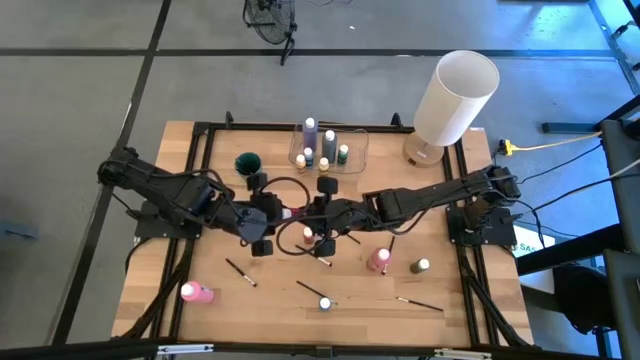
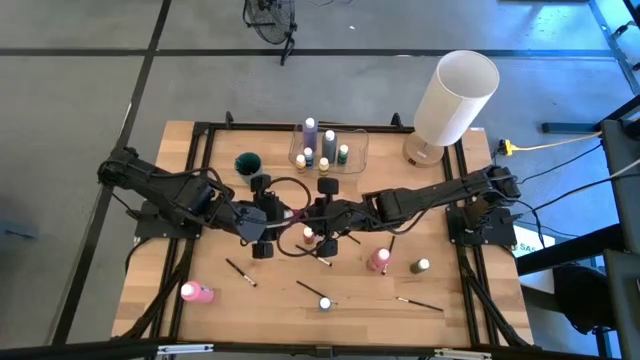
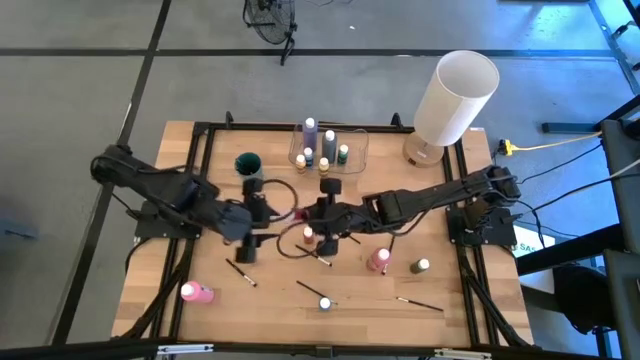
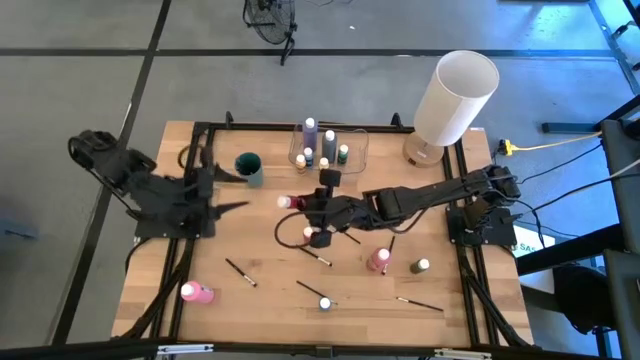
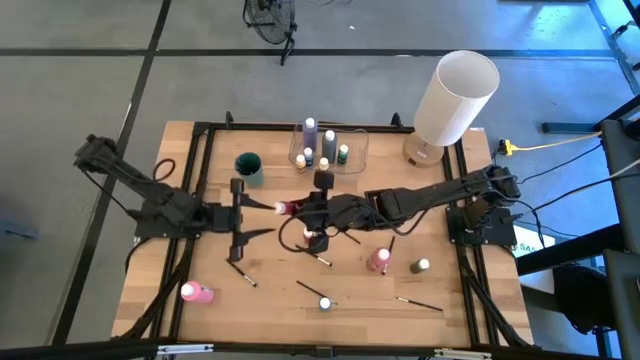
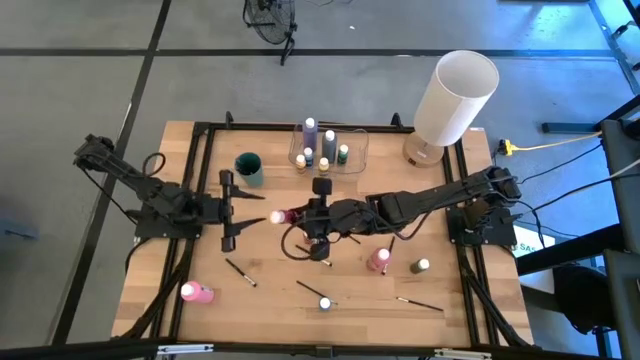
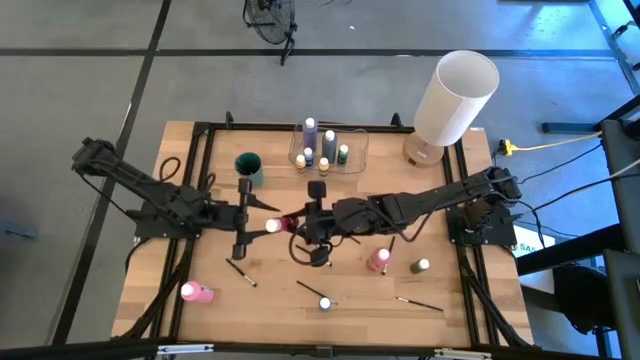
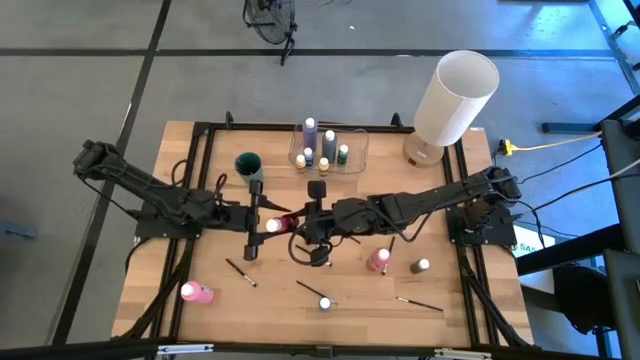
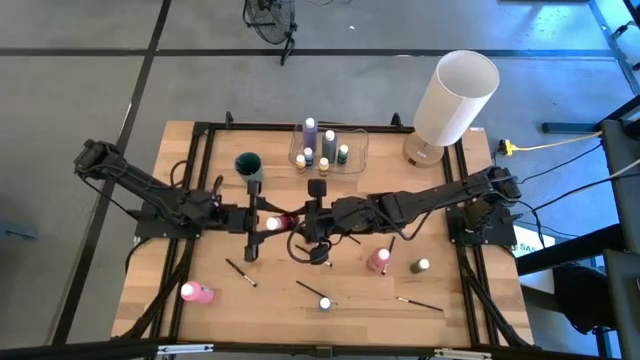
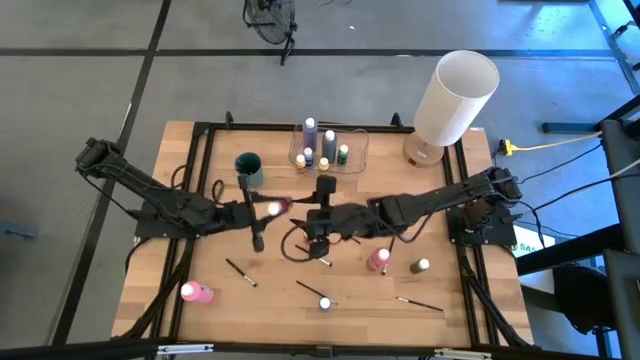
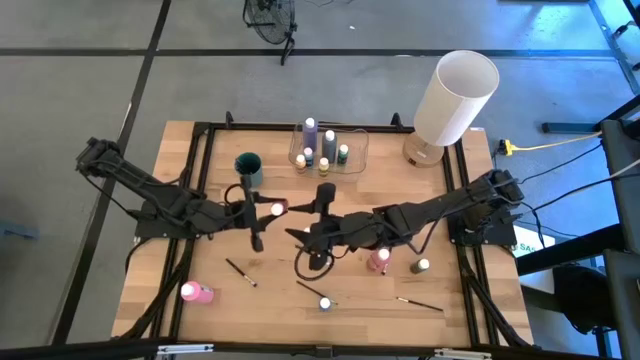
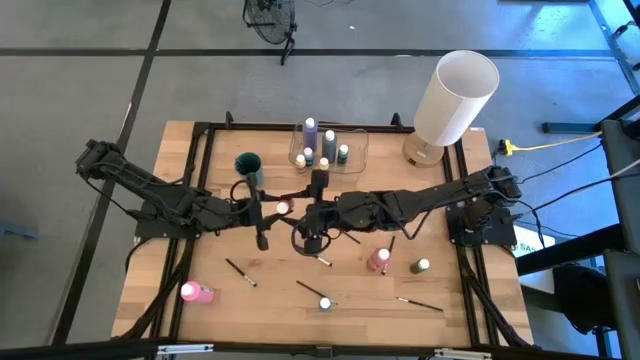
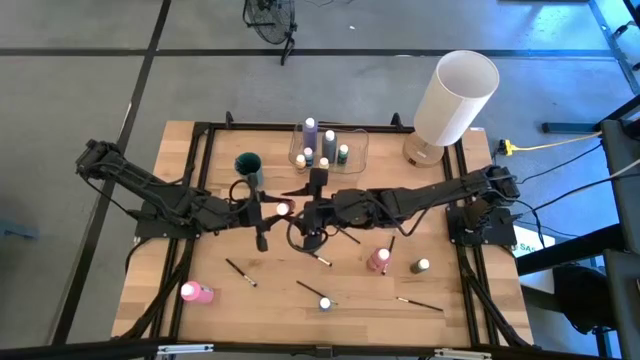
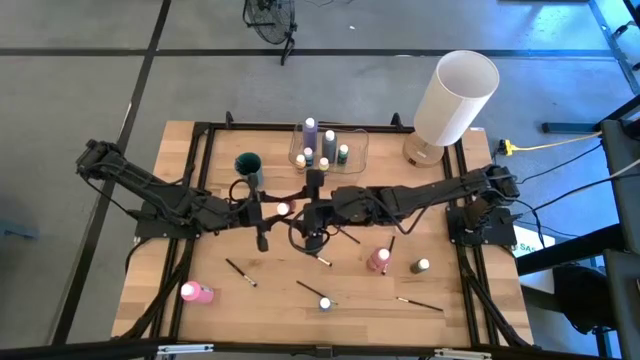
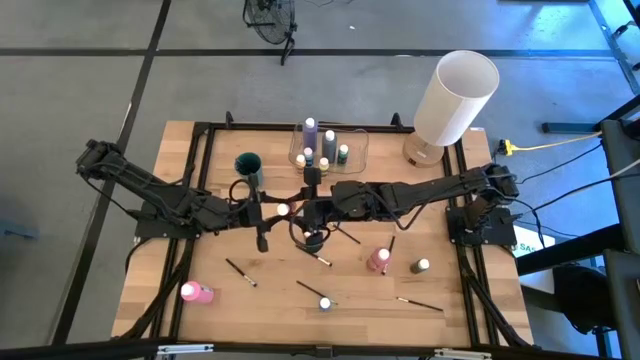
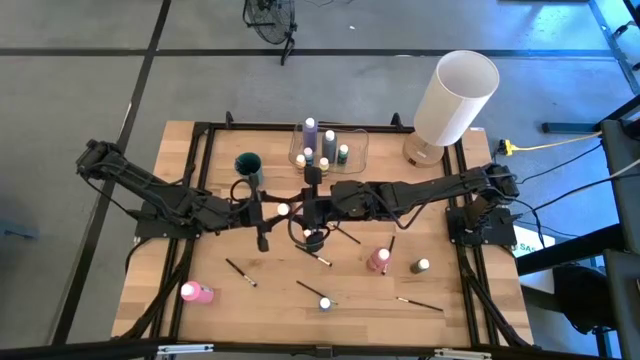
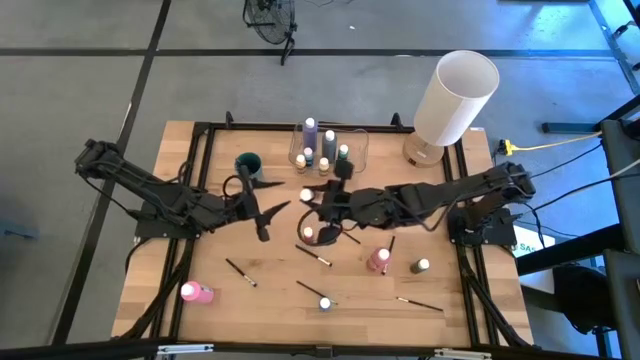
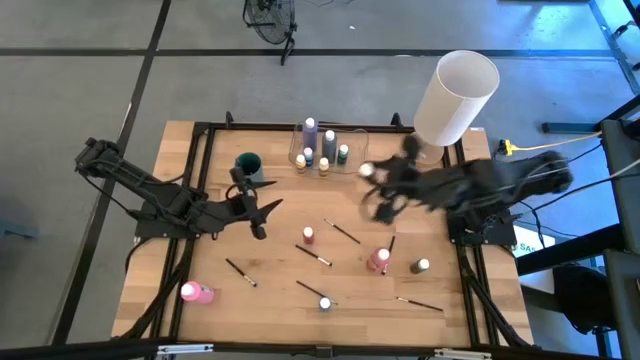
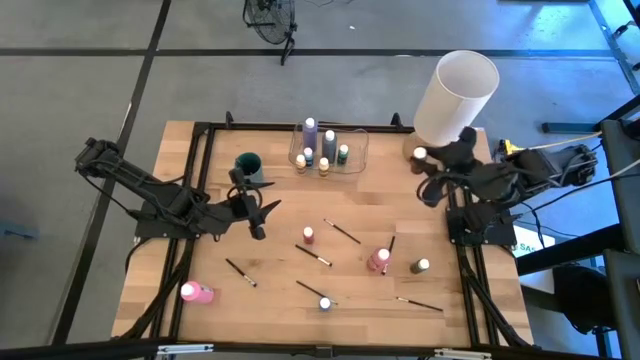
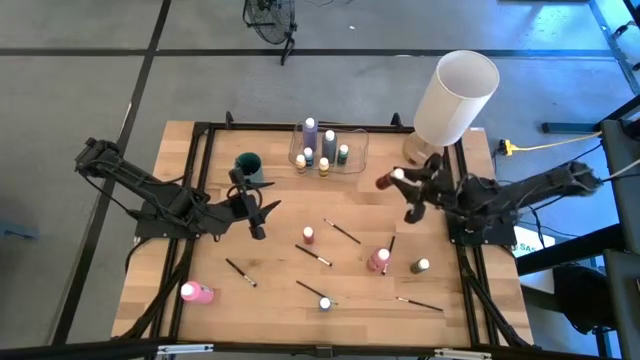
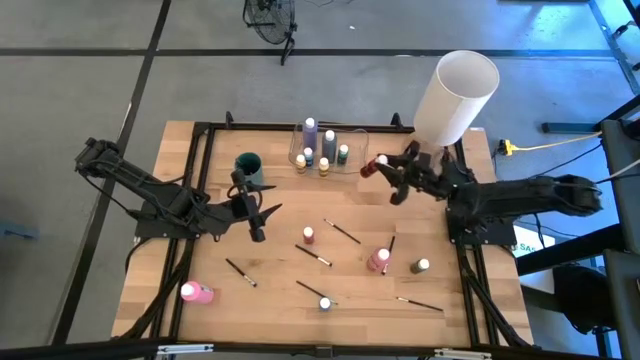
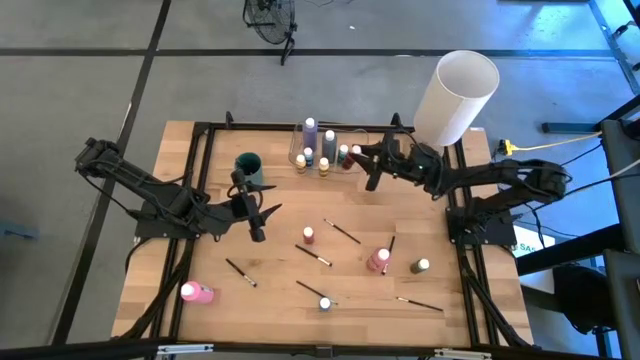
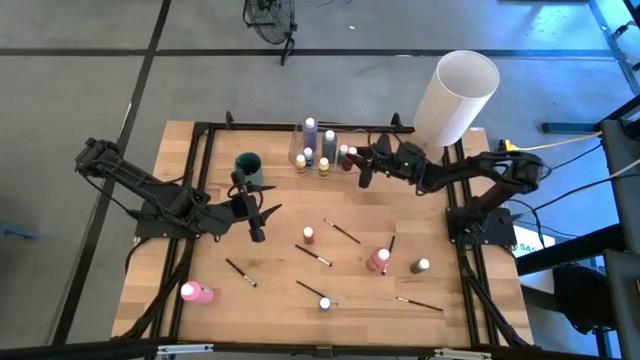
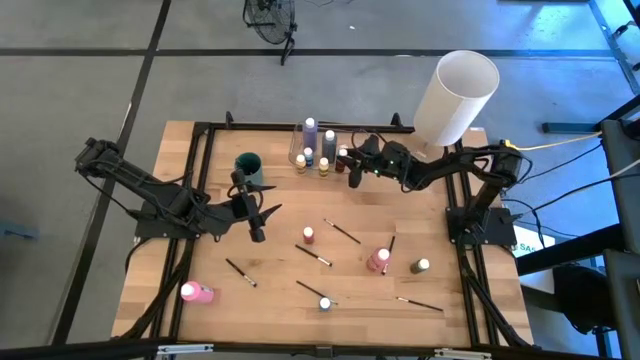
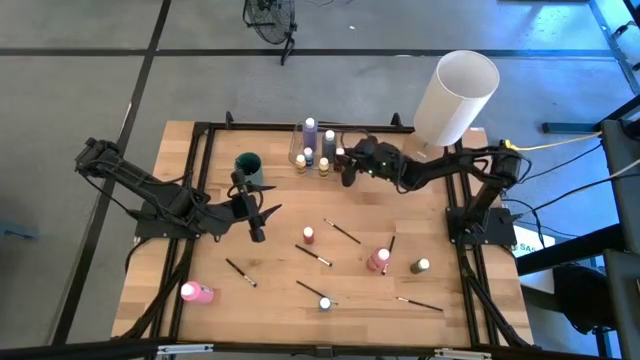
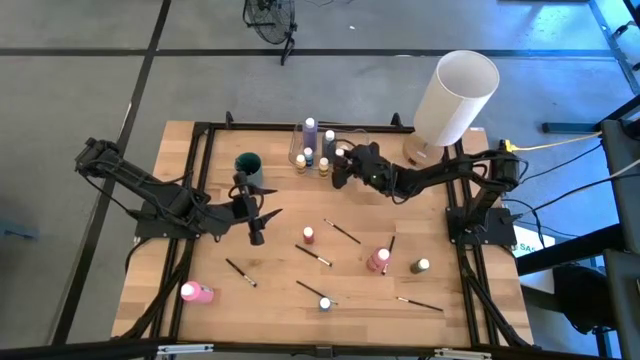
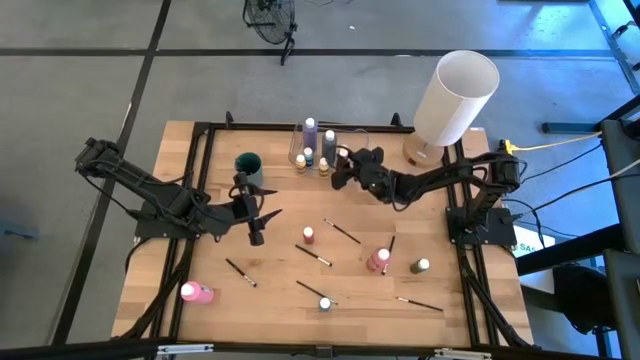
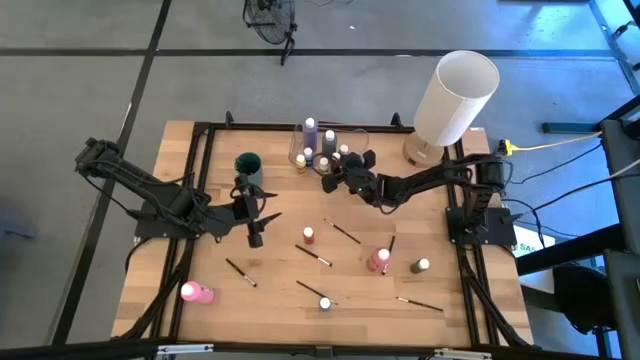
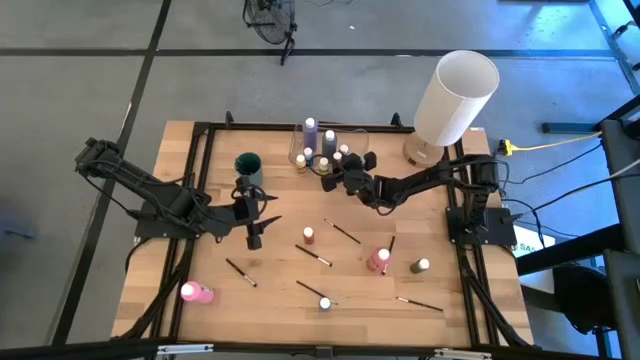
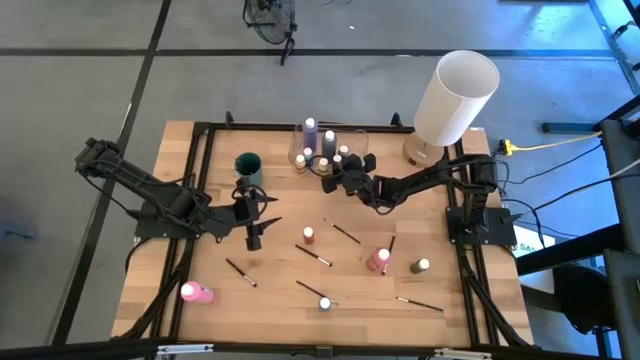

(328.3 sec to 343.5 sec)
Task: Pick & Place Paint Supplies
Put the red paint bottle into the transparent bin

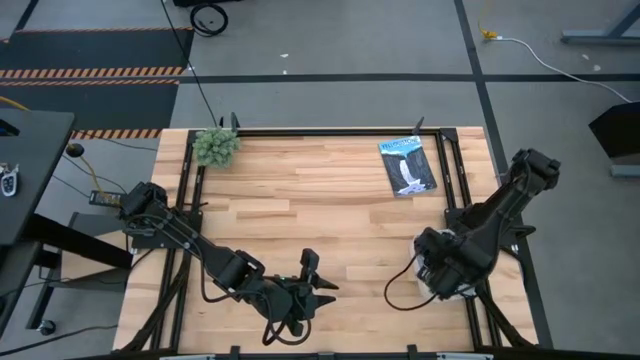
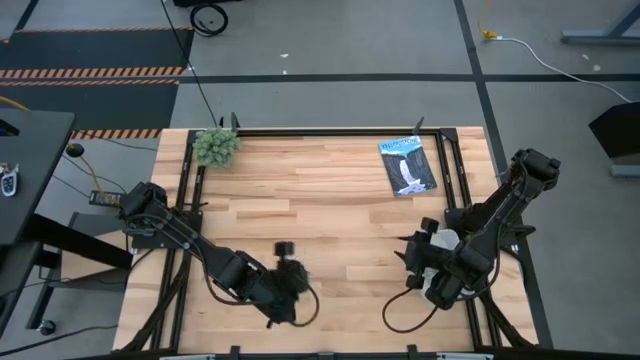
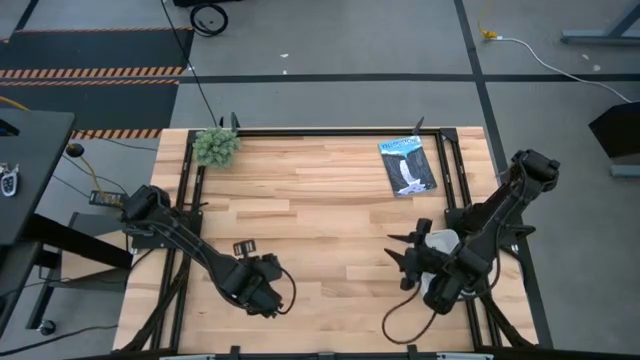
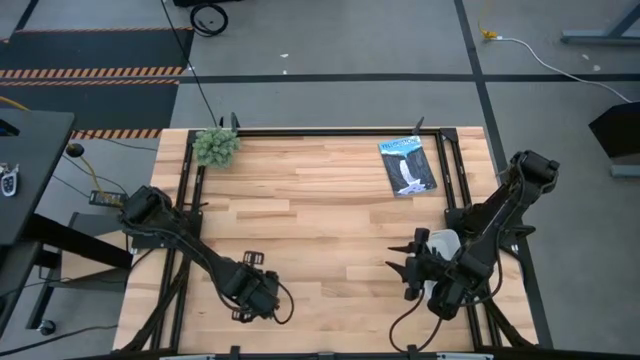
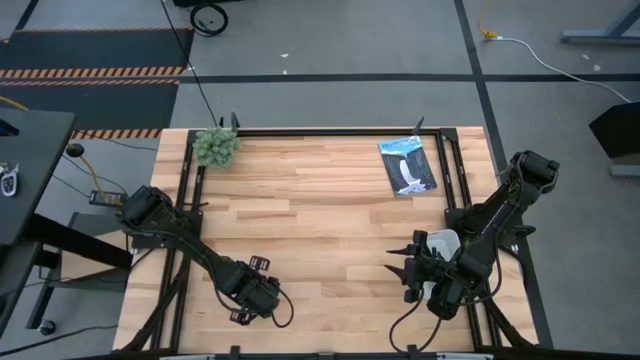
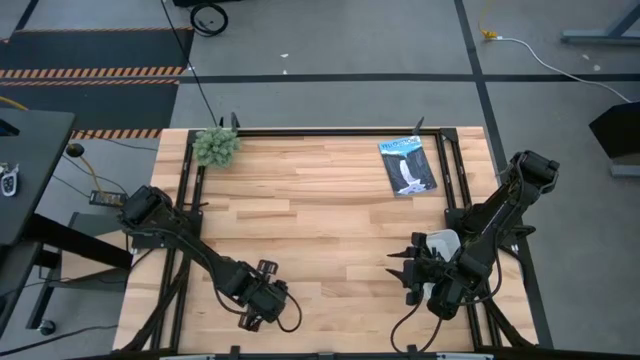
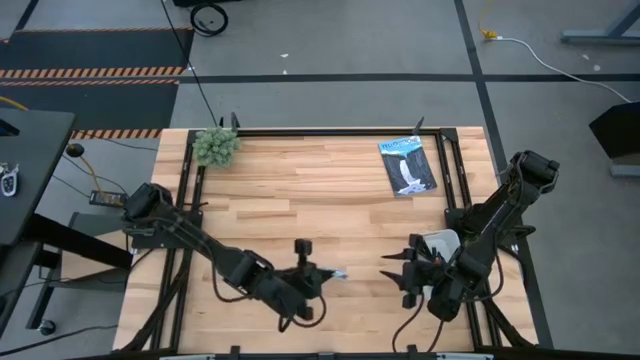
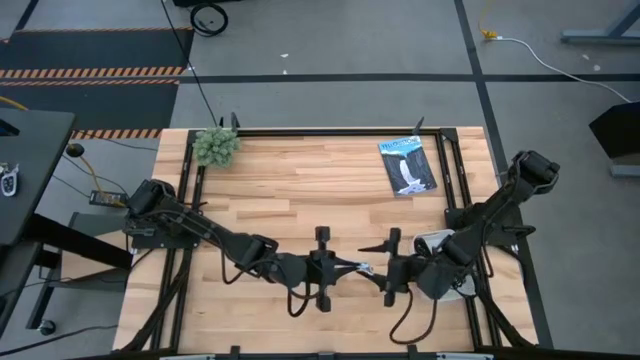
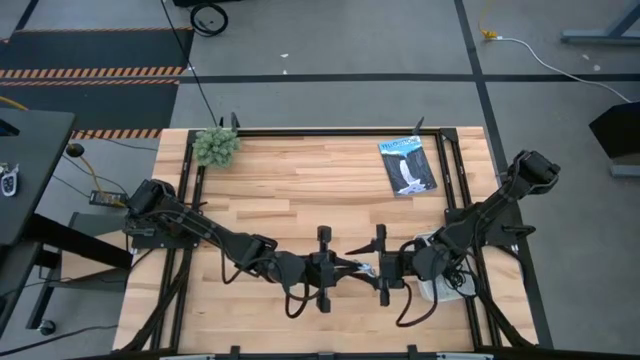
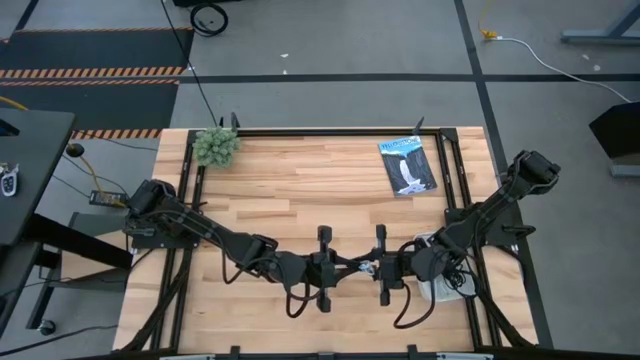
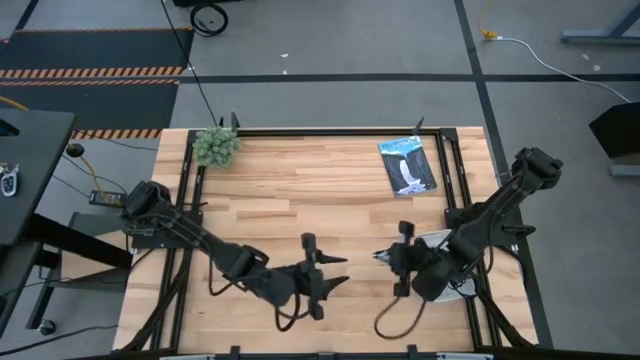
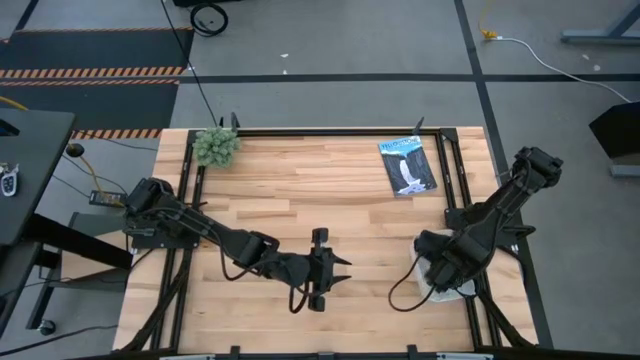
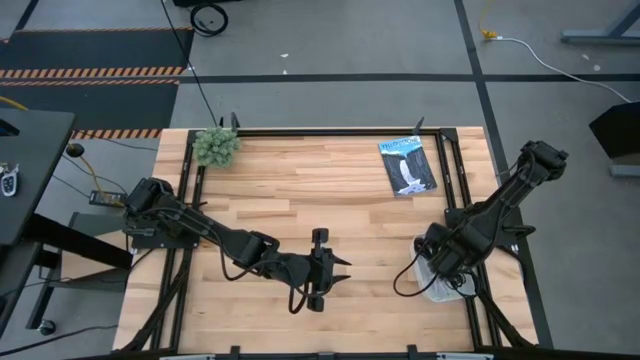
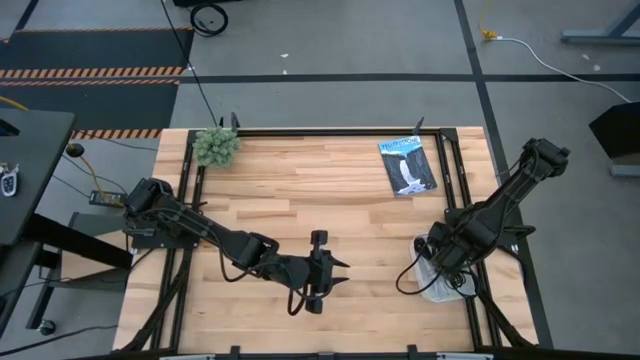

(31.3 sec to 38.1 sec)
Task: Pick and place USB-C Cables
Put the gray charger cable into the white container
